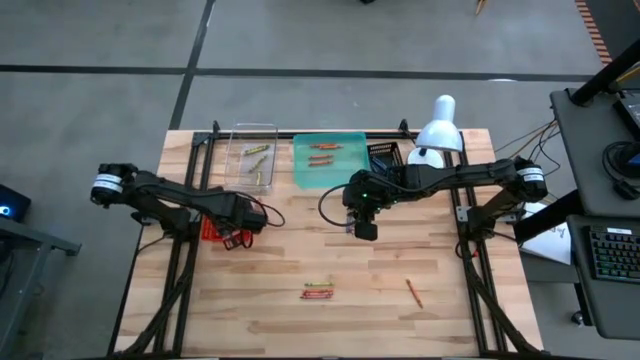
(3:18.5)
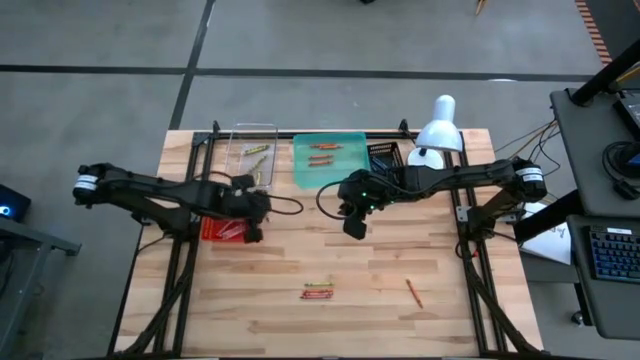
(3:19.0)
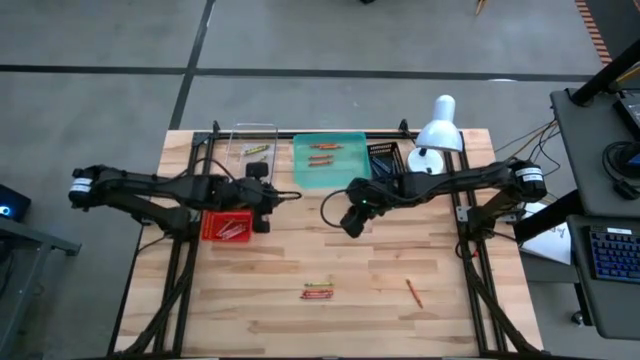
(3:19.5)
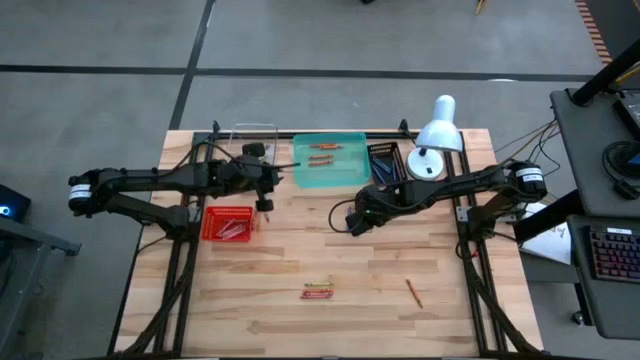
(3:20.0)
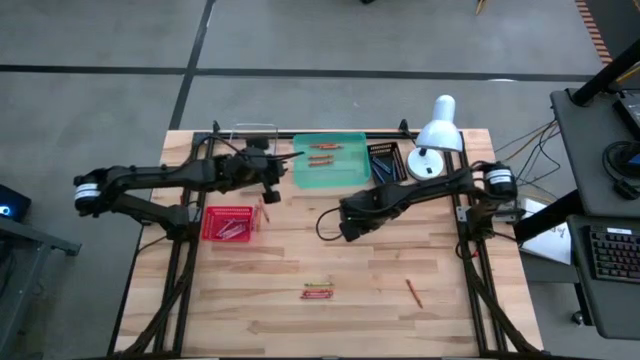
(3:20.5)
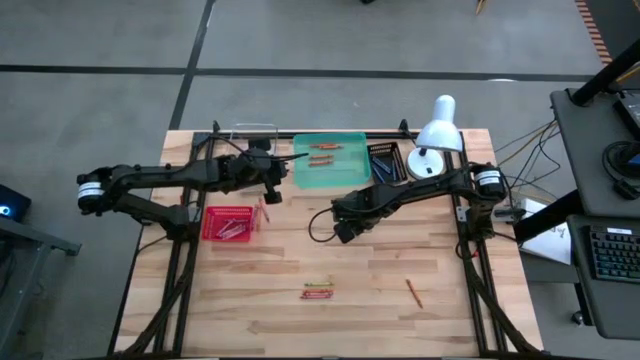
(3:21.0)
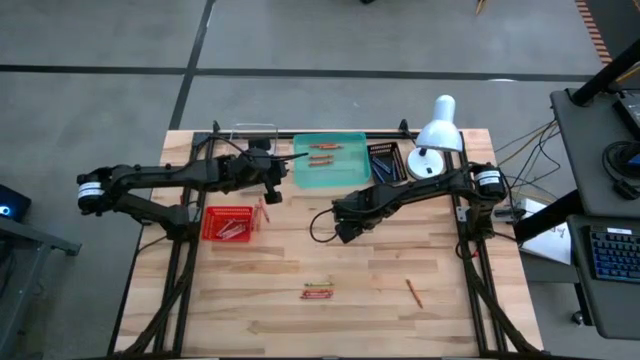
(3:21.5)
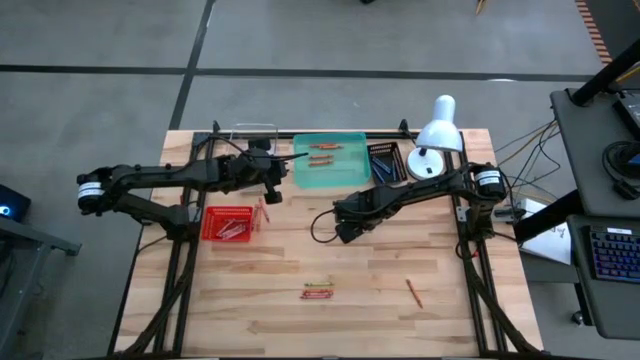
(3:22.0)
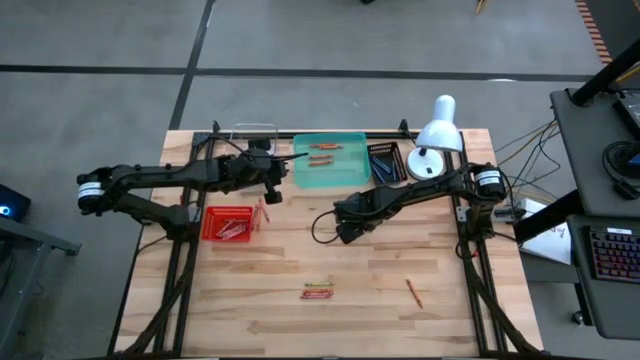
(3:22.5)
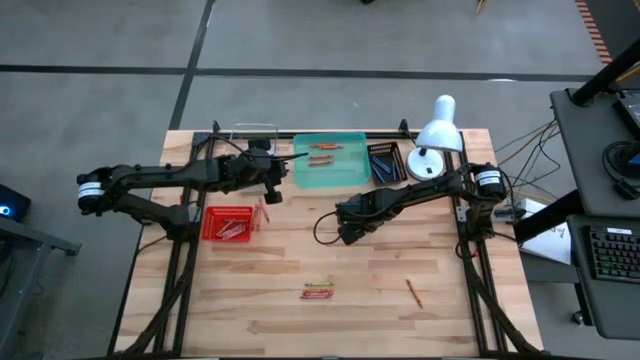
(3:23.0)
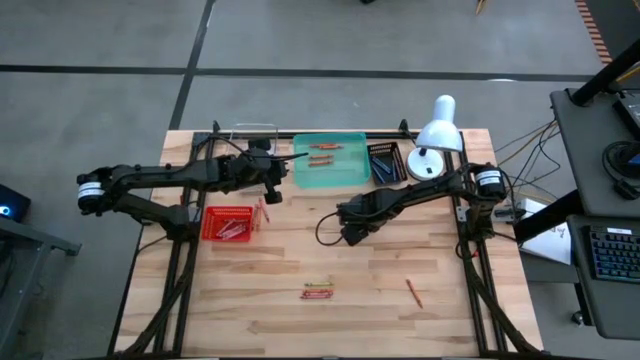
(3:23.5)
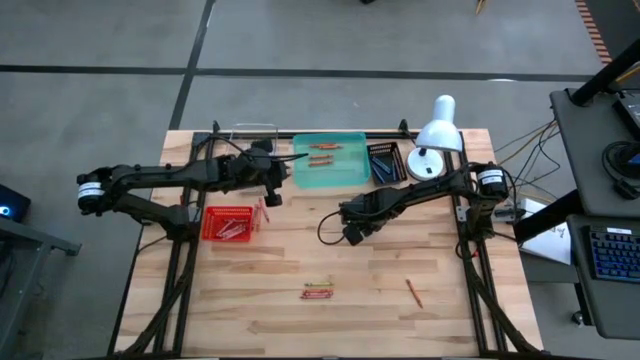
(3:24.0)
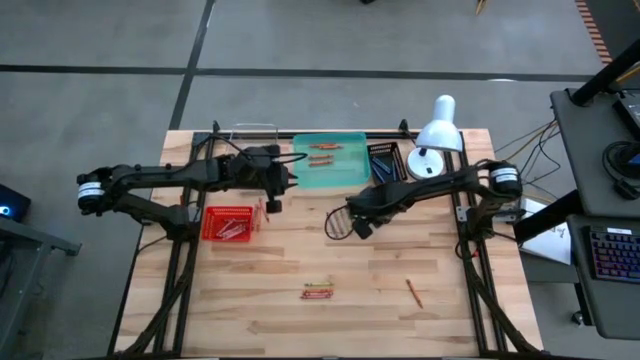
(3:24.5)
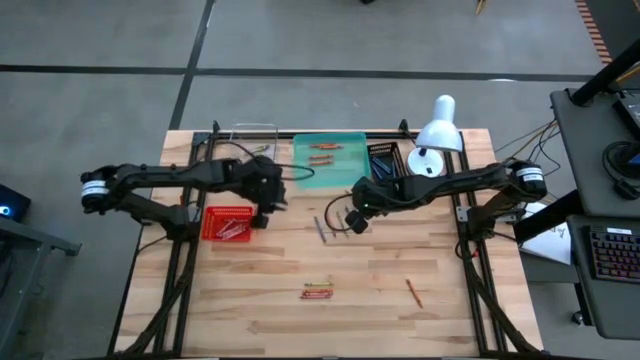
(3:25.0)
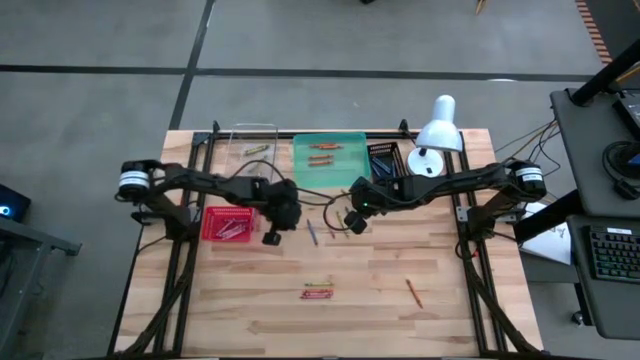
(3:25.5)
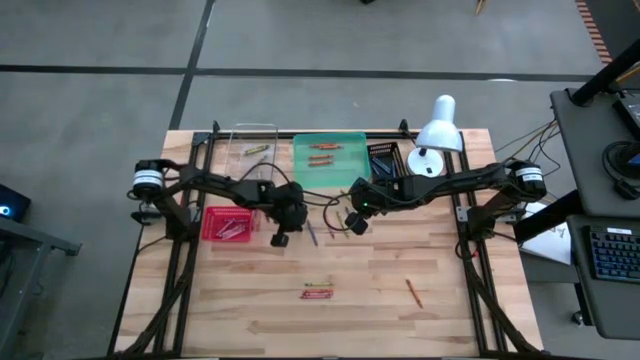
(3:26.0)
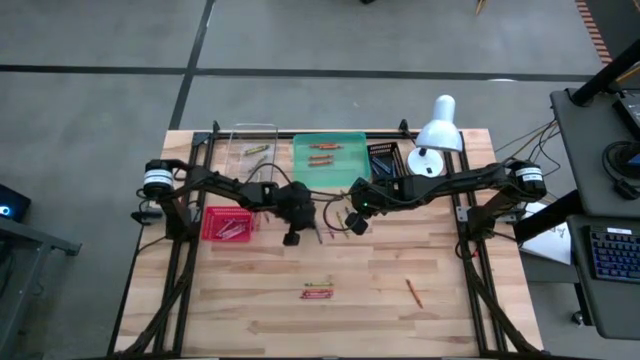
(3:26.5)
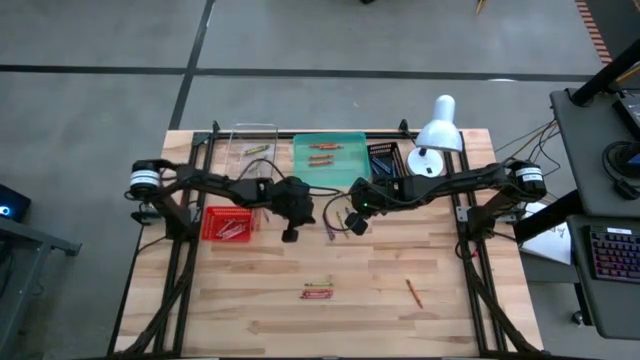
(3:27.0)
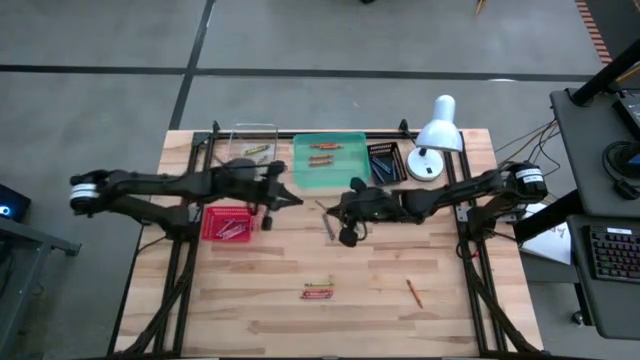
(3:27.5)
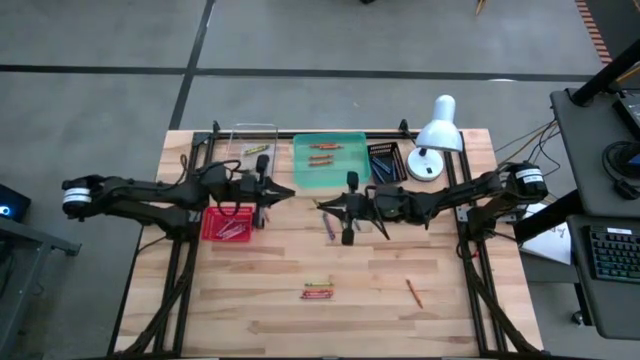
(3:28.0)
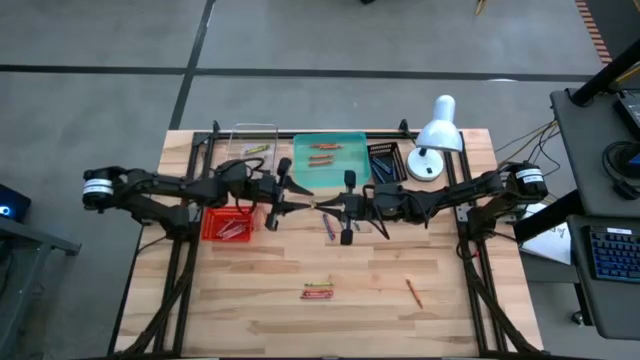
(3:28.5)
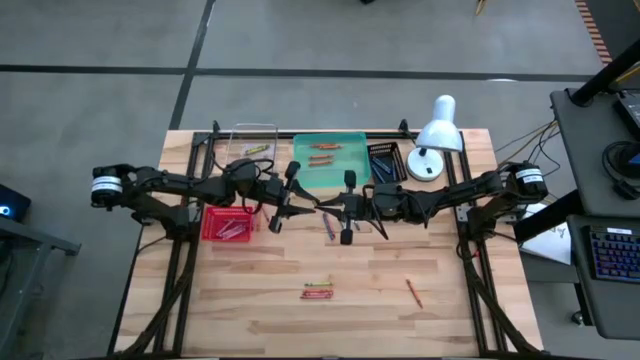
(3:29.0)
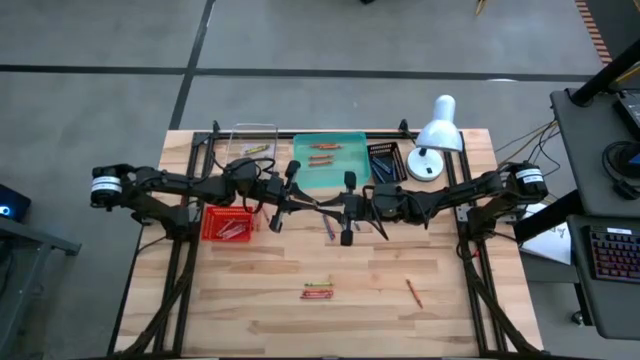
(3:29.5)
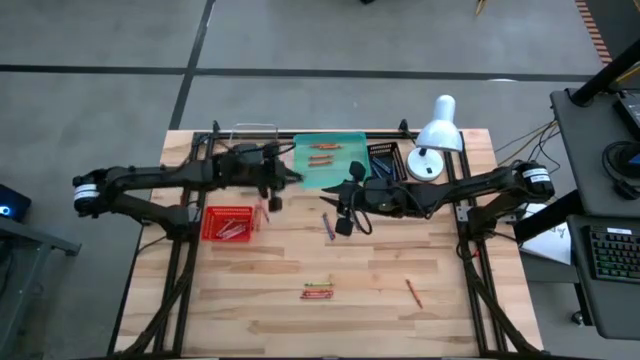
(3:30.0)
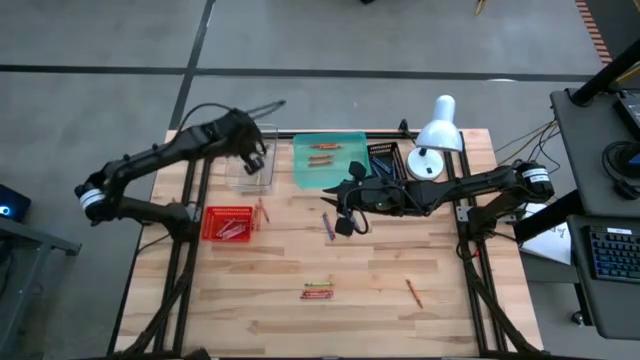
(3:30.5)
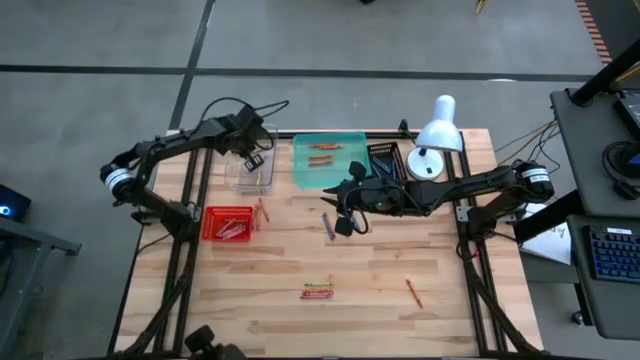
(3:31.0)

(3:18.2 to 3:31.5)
Task: Sort crayons
Put the green crayon into the transparent bin

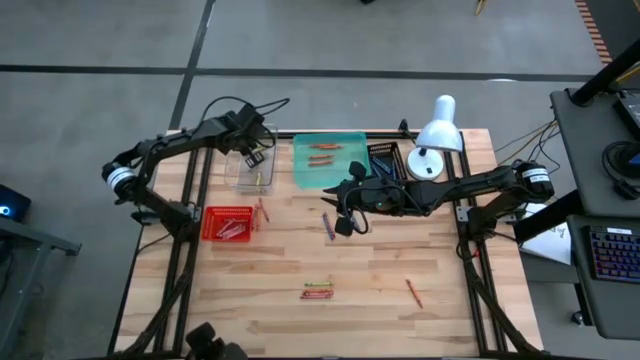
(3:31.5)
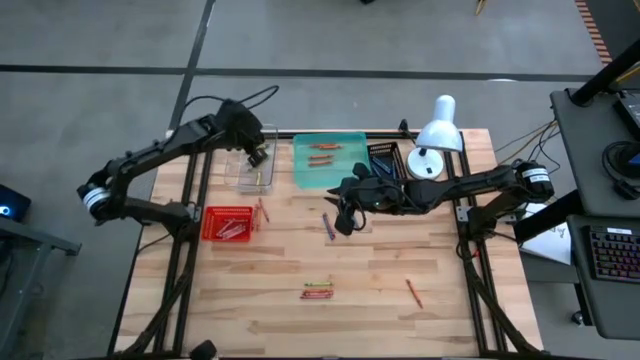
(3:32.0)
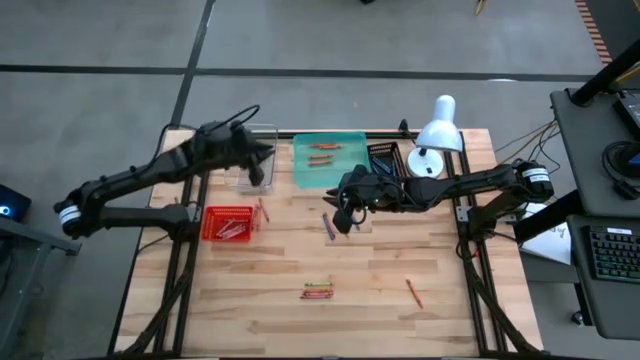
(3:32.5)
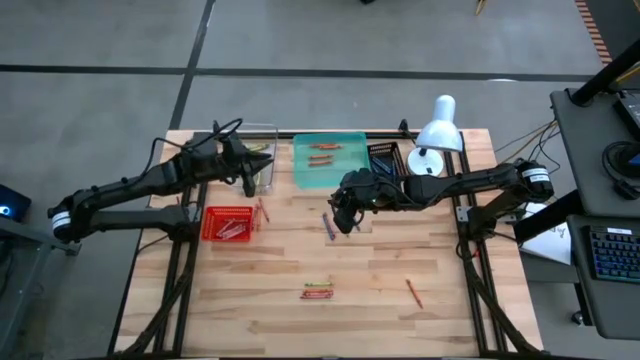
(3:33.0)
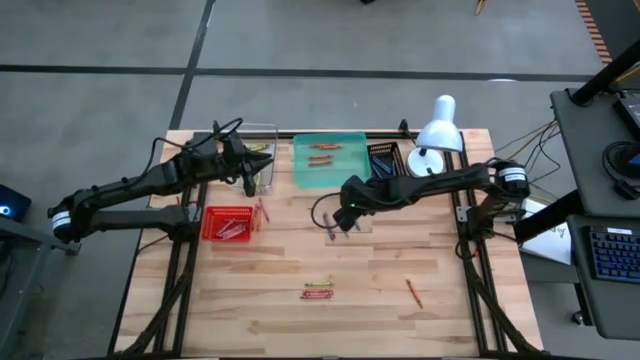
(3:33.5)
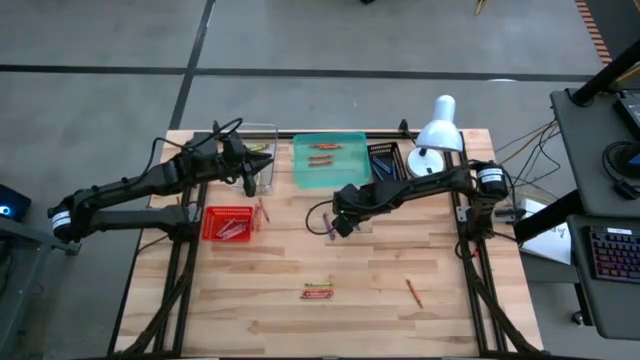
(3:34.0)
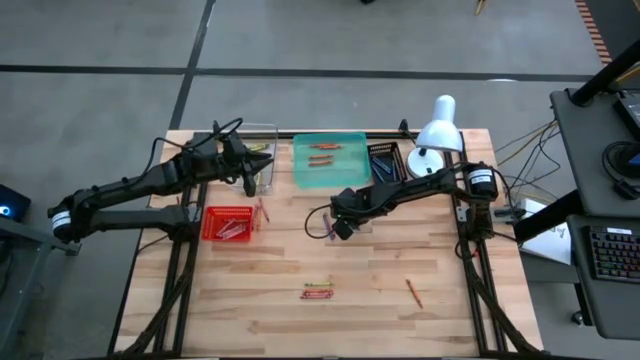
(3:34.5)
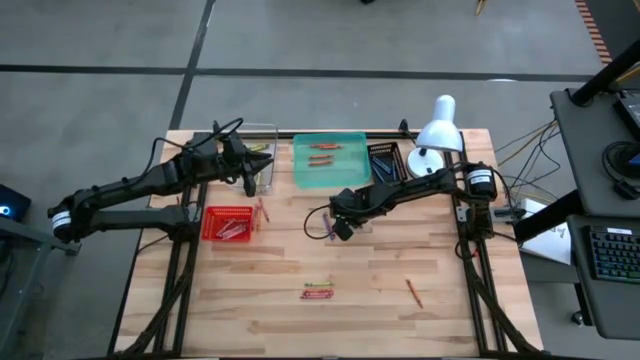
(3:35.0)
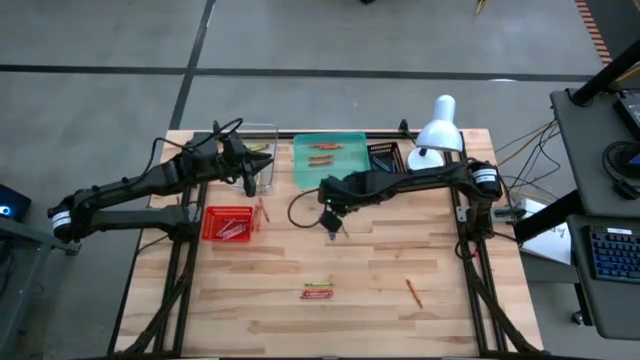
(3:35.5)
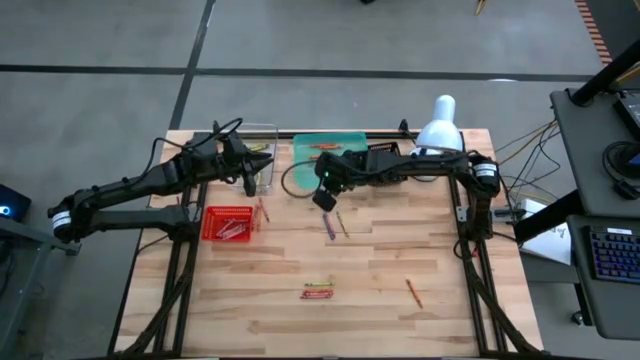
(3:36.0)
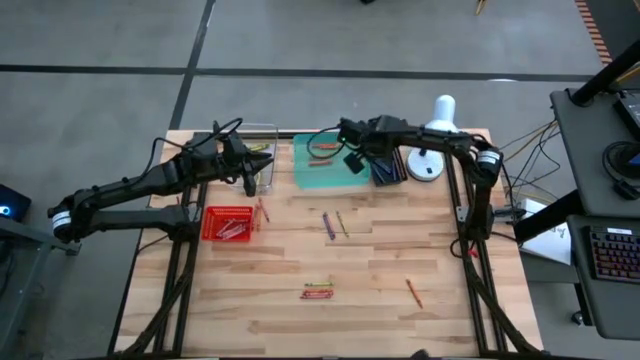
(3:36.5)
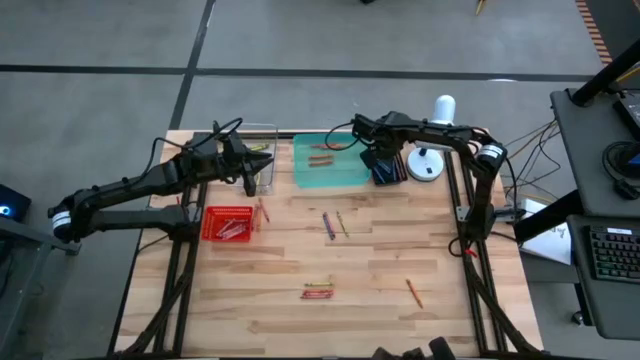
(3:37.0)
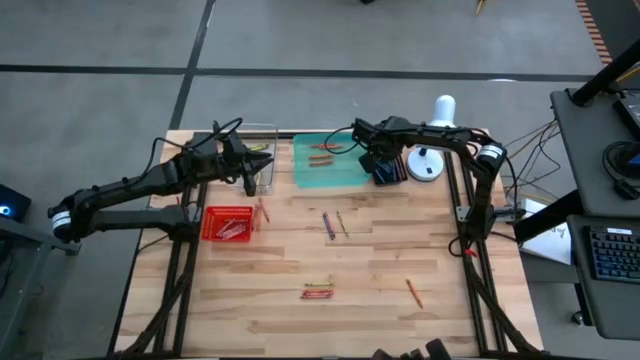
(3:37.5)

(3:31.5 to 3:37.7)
Put the blue crayon into the black bin

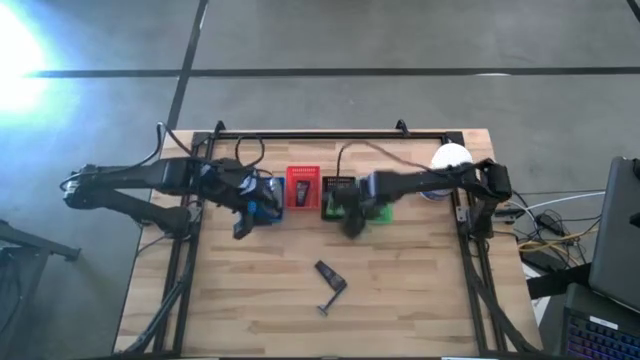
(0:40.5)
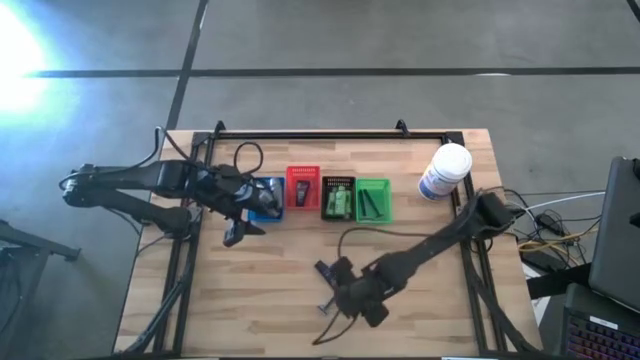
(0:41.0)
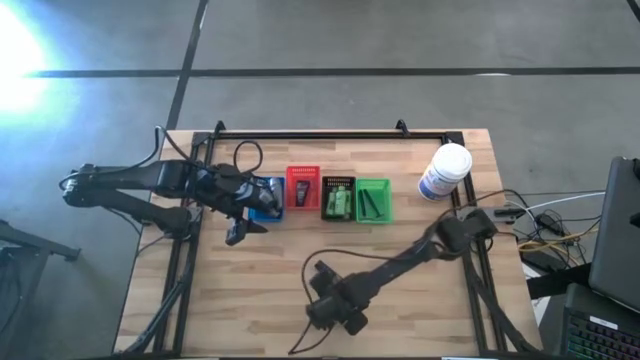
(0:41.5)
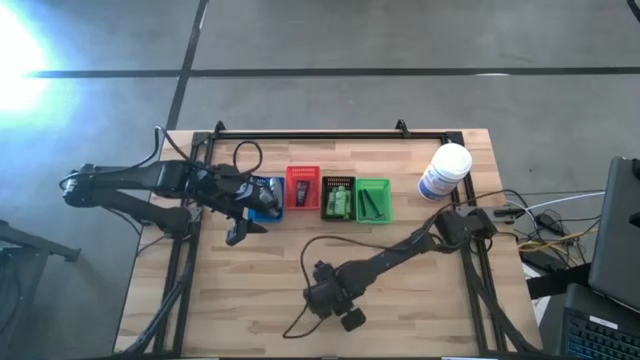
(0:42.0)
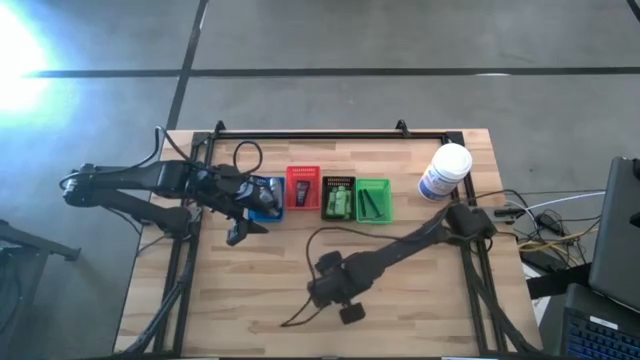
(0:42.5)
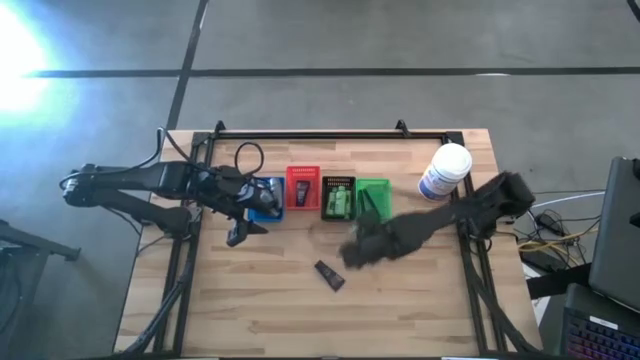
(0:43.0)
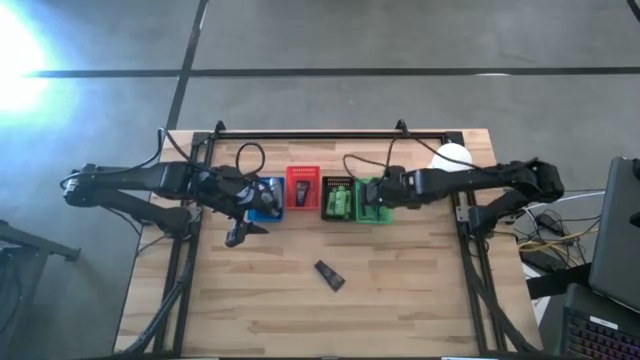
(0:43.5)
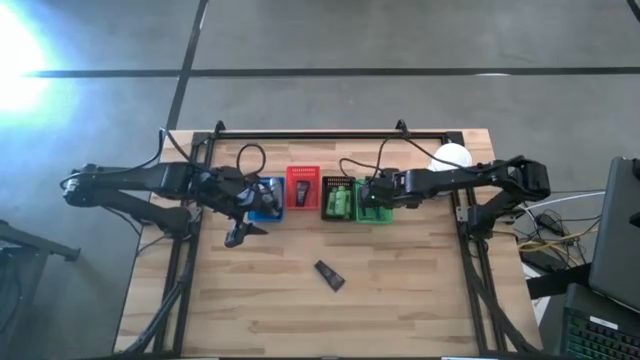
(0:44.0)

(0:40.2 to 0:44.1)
Task: Pick & Place Travel size toiletries
Put the blue razor into the green bin
